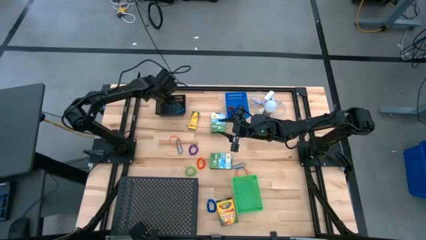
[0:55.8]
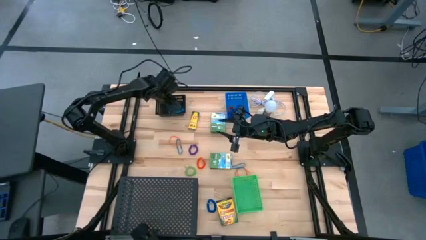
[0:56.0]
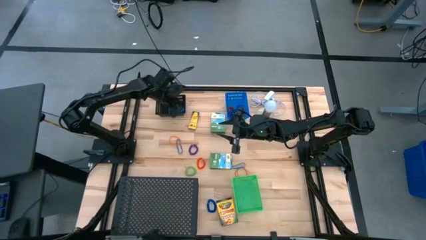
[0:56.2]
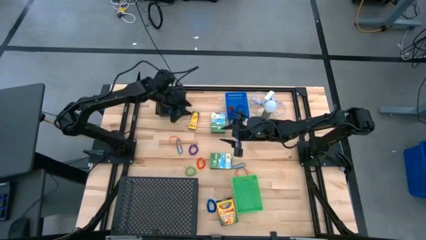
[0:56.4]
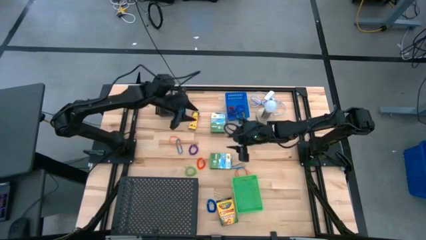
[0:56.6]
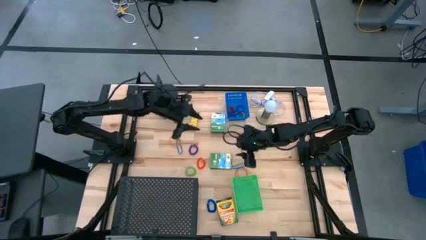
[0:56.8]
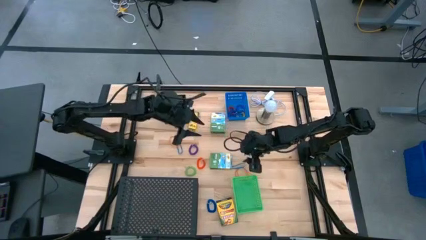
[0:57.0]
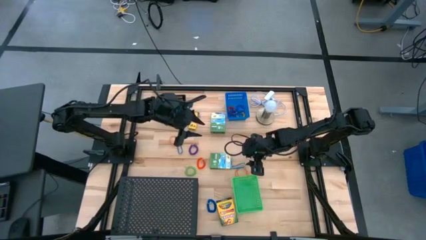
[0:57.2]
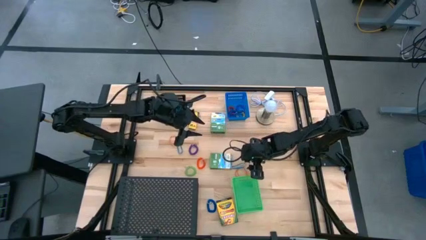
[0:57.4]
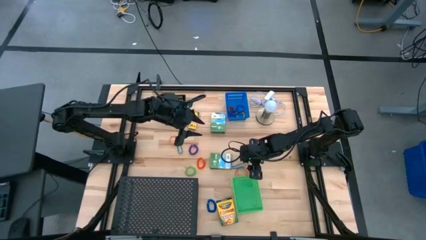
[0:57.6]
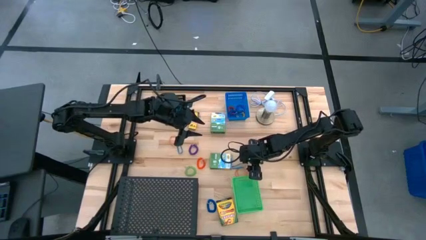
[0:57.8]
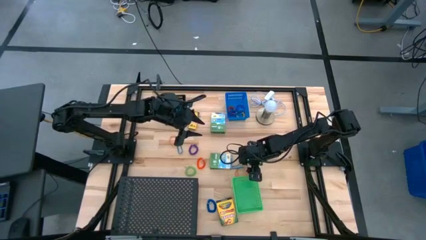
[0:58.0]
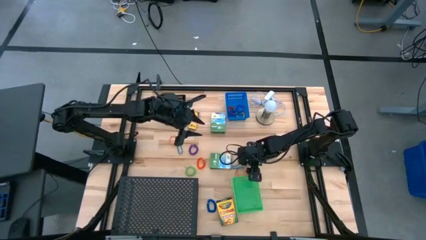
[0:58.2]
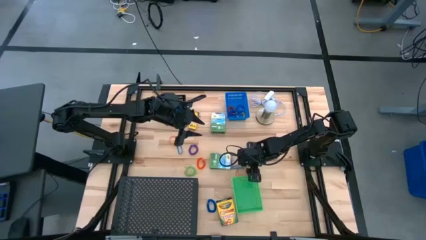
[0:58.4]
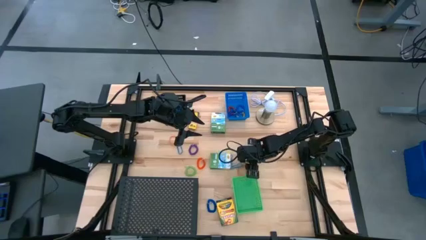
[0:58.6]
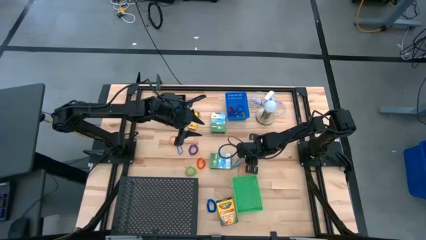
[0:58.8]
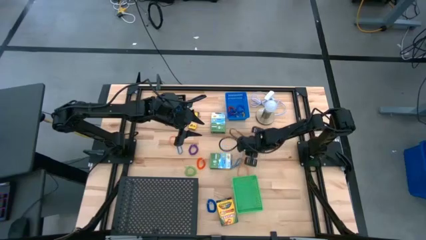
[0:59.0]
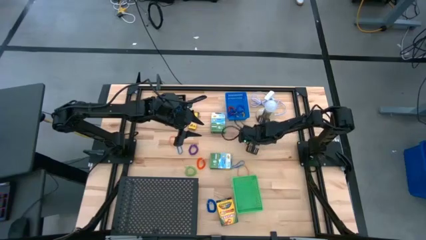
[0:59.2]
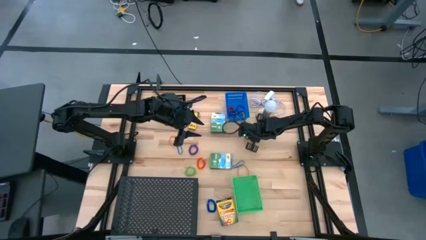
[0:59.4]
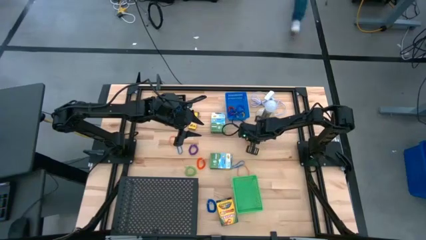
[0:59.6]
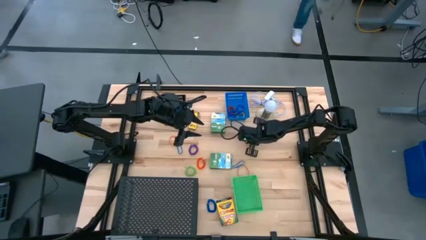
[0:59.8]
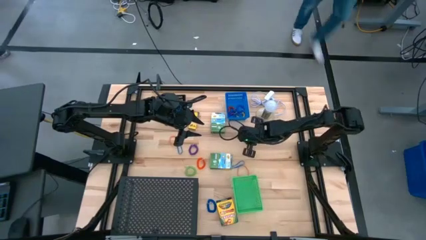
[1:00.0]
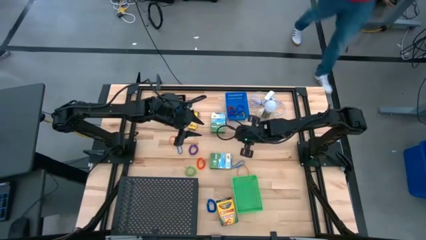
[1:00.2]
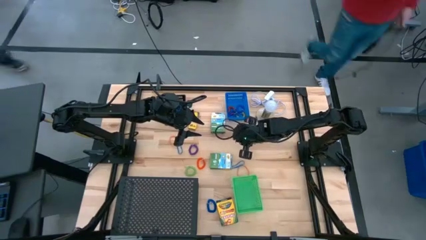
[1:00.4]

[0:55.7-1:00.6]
Task: Pick & Place Office Desk Supplies
Put the top right orange rubber band into the black bin

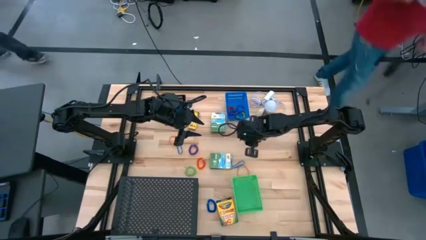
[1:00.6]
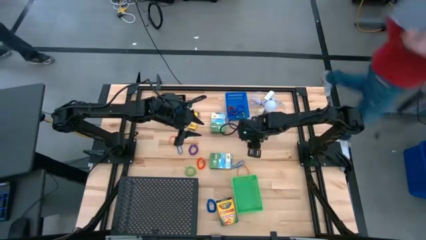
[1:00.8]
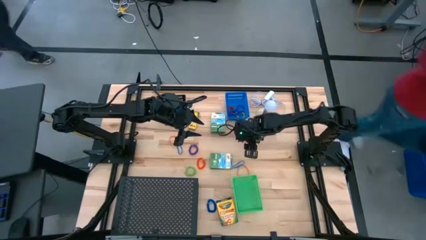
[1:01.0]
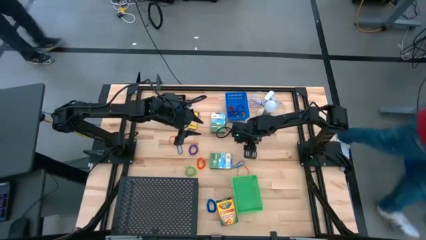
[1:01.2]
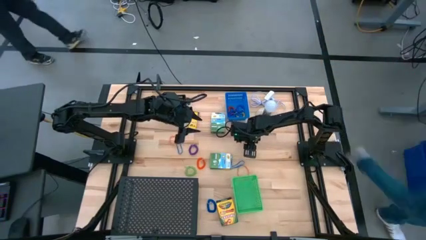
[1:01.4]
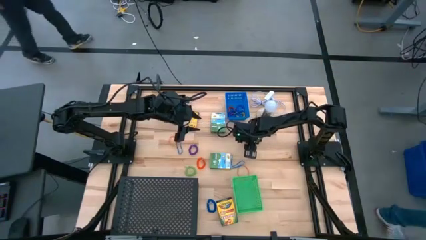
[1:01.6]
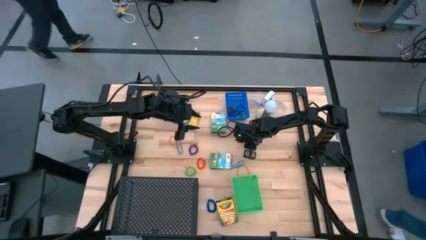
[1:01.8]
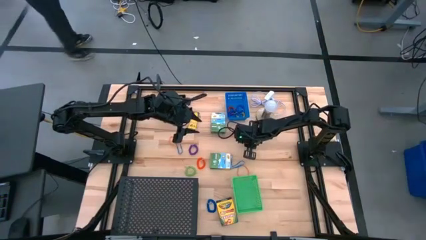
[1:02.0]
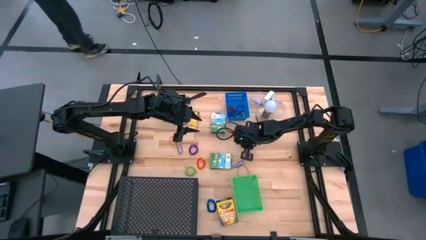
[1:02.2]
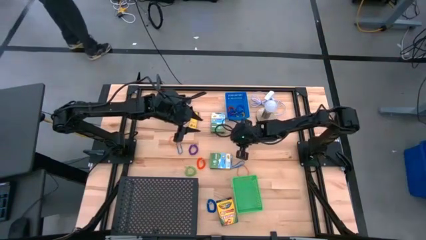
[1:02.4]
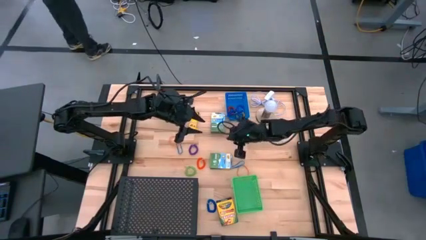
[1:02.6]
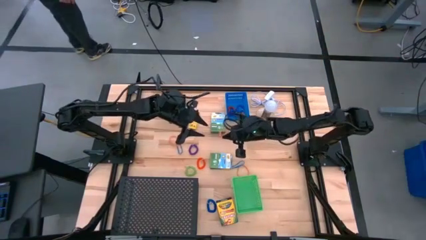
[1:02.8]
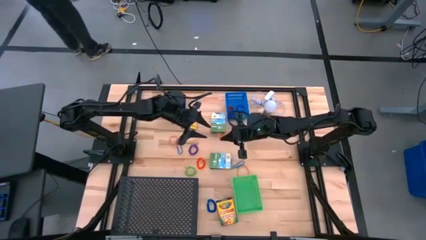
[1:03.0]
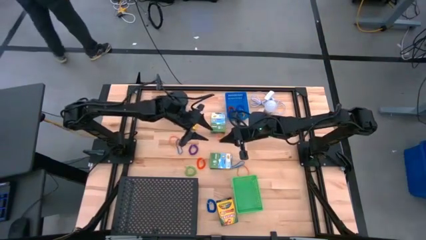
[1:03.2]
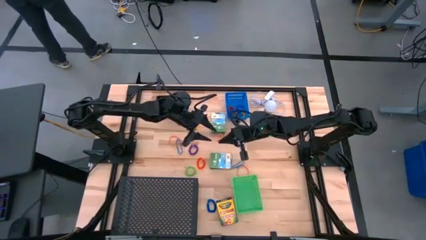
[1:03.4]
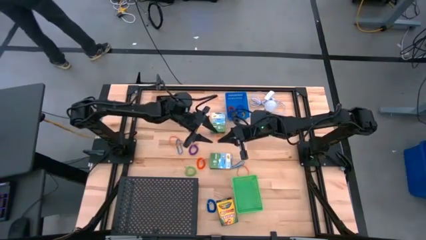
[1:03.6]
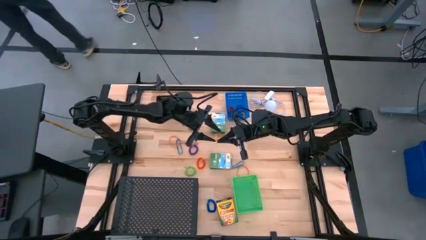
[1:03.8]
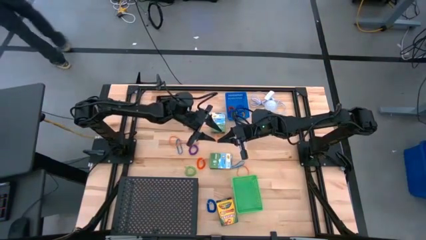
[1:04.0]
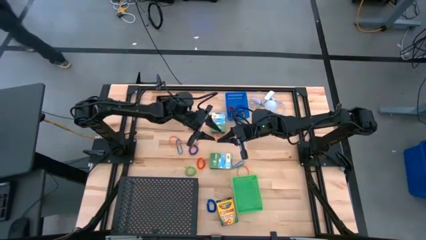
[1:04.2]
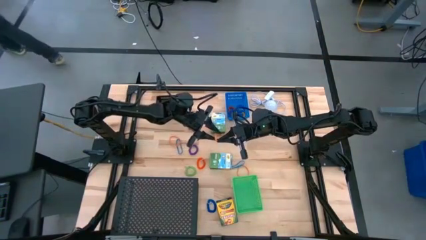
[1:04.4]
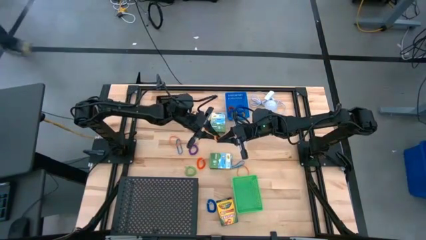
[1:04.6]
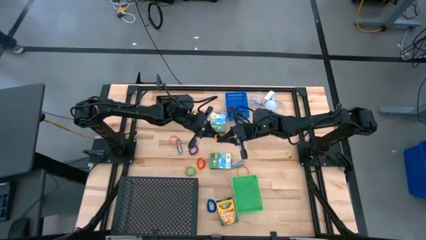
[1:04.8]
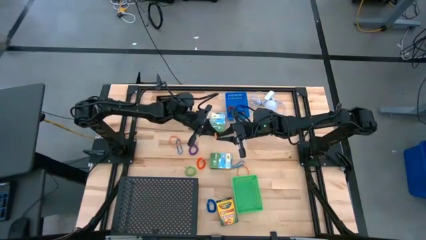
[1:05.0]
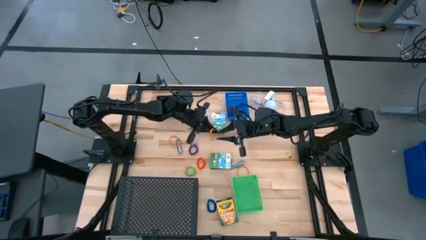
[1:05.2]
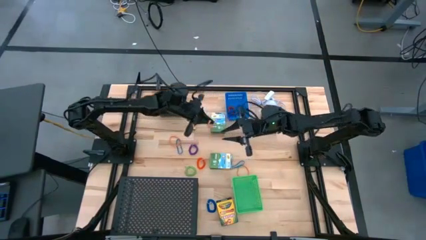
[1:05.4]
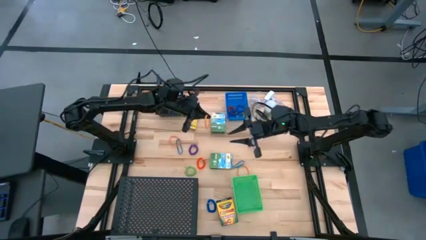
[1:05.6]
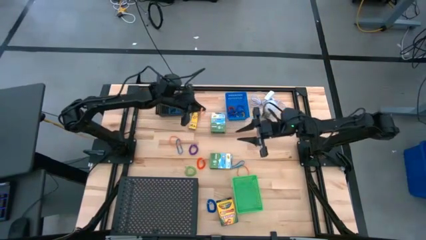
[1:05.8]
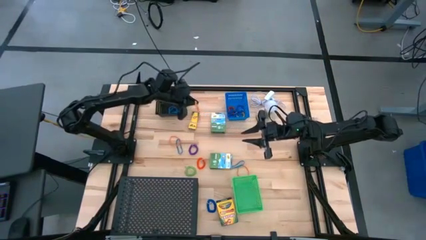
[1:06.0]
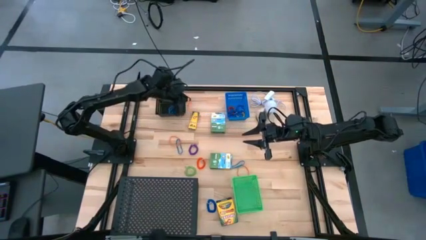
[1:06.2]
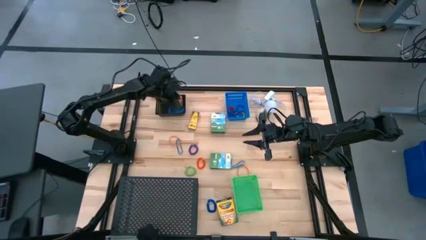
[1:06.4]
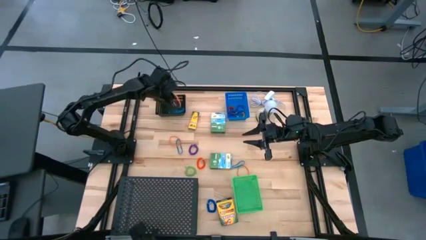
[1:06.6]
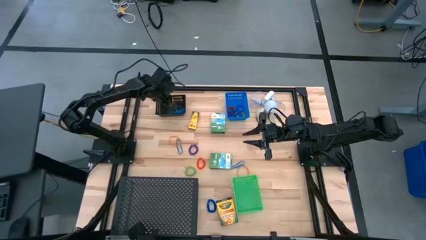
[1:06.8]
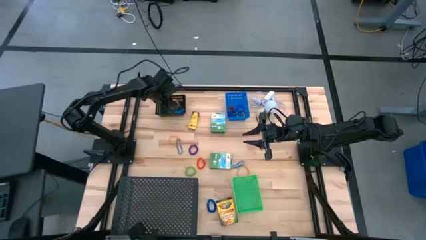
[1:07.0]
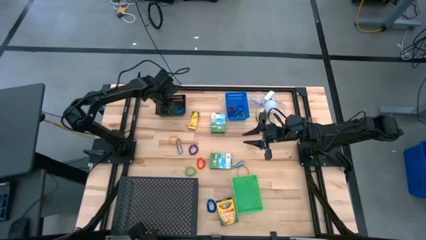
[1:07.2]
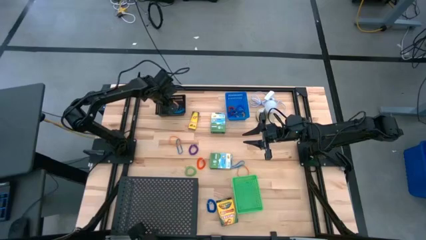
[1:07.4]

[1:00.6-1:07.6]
Put the top right orange rubber band into the black bin

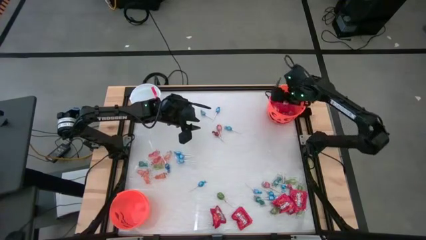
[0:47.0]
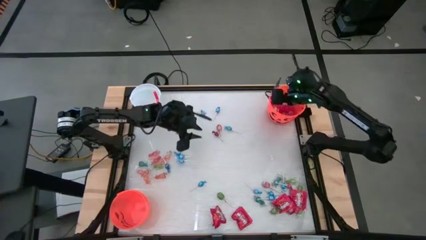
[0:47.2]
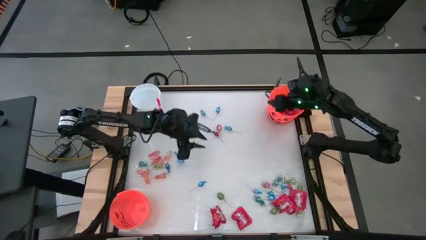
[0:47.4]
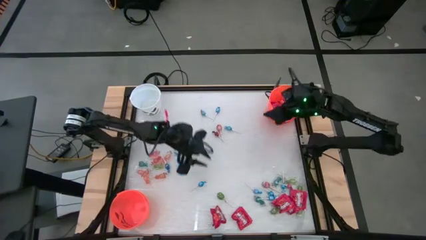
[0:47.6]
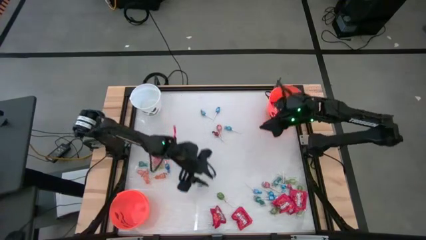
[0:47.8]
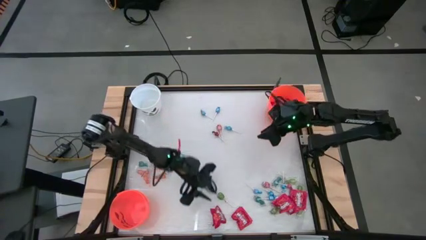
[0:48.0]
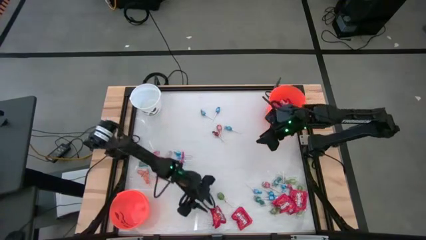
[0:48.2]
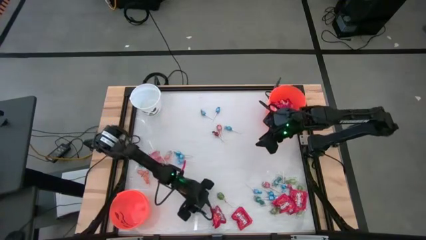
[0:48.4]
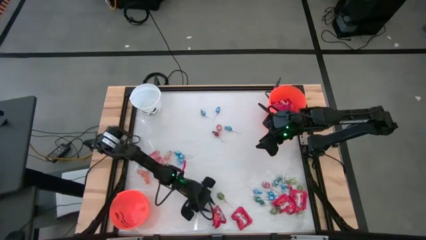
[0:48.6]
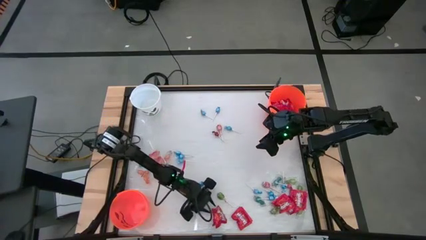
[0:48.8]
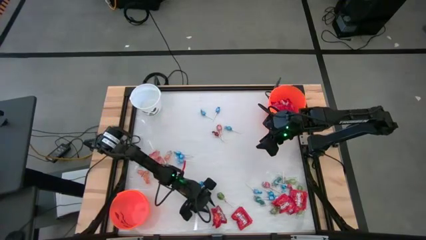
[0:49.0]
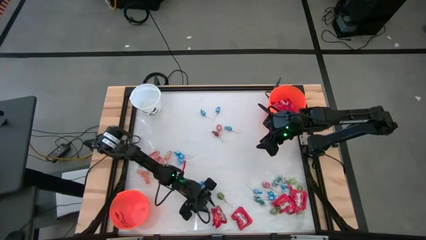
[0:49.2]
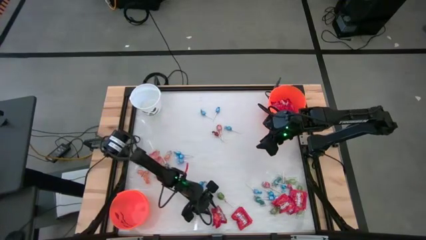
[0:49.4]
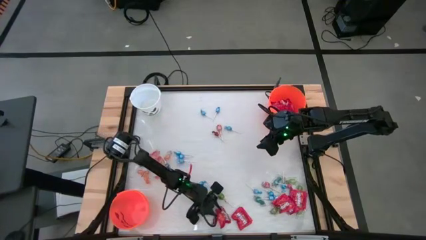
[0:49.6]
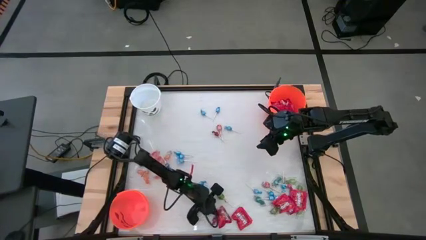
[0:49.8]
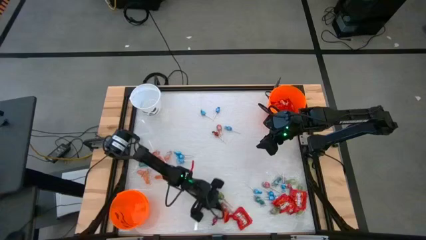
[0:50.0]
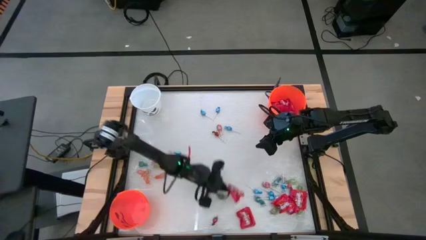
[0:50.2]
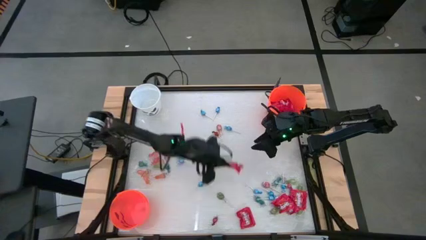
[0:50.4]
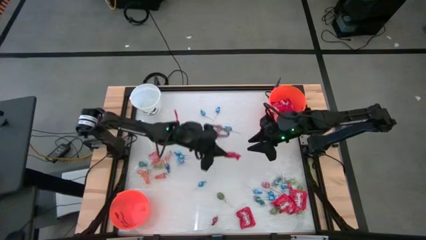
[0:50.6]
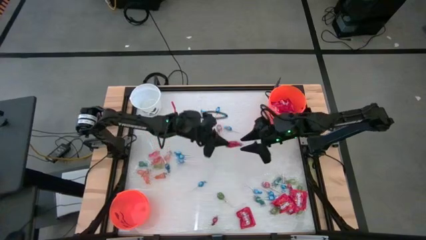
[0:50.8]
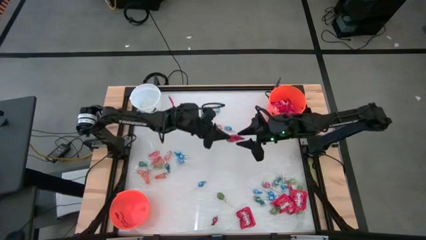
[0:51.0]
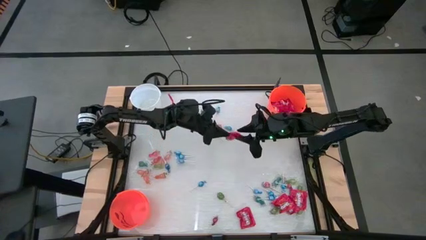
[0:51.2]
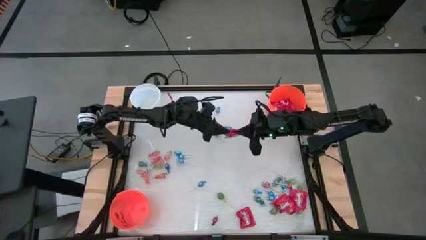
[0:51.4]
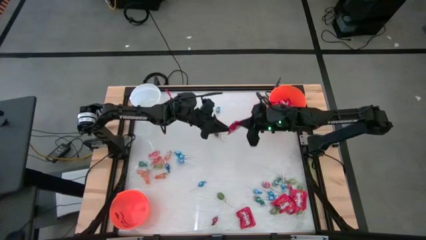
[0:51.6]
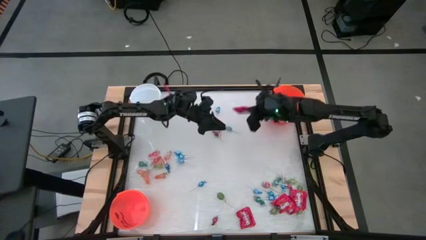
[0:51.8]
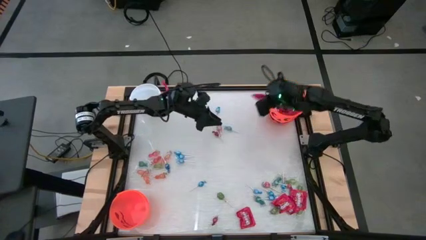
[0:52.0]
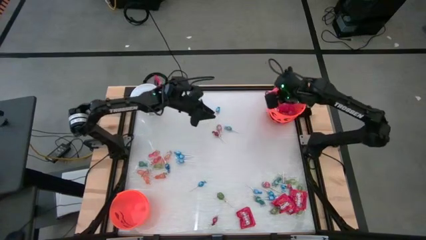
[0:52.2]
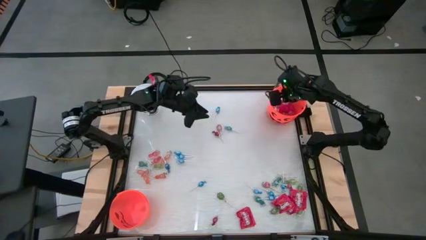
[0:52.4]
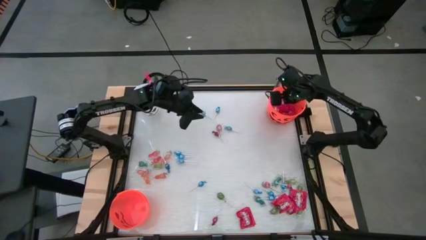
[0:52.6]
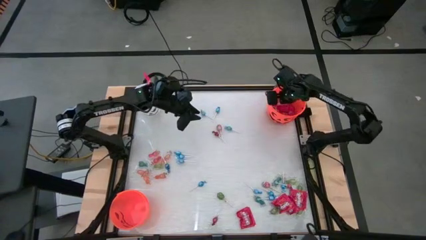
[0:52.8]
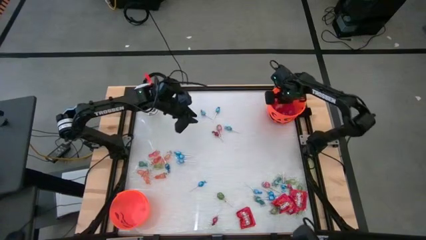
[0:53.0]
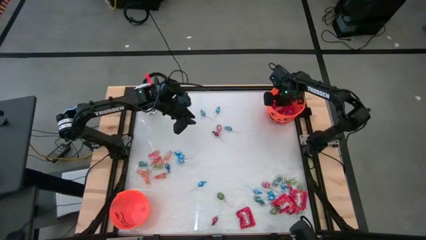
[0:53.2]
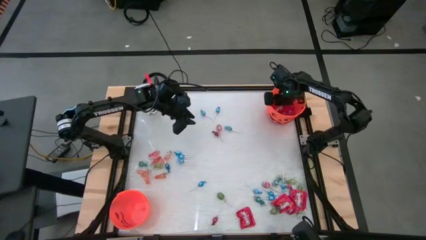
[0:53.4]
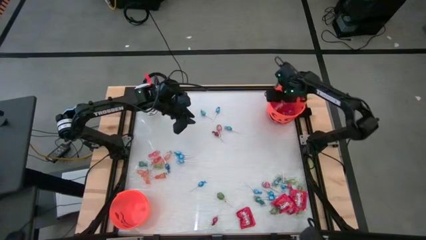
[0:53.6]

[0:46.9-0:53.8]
Task: Sort candy by brand, put in halloween buckets
Put the red candy into the top orange bucket
